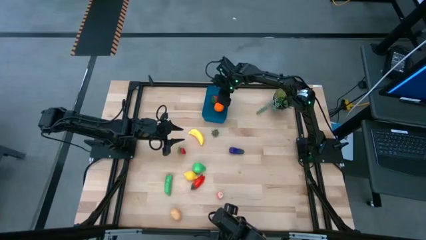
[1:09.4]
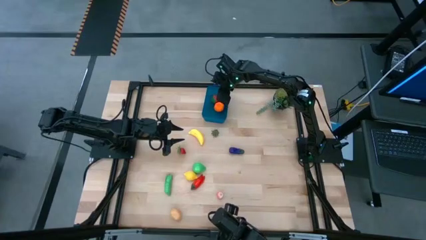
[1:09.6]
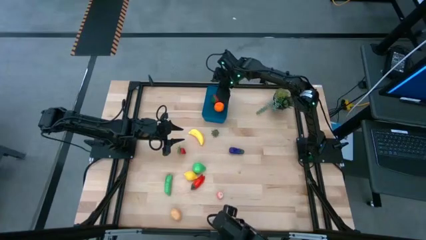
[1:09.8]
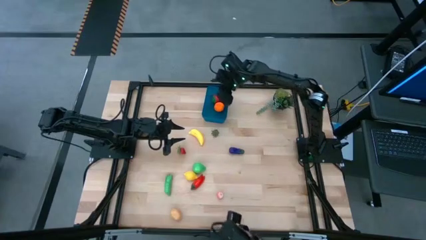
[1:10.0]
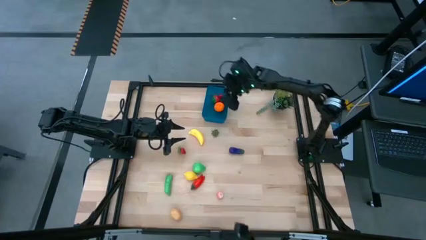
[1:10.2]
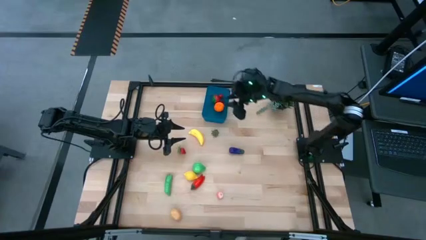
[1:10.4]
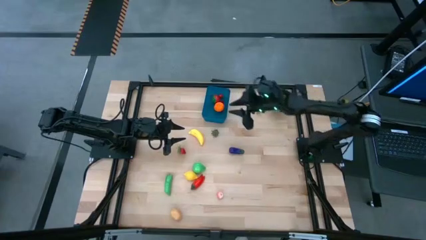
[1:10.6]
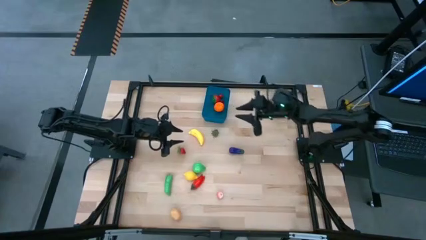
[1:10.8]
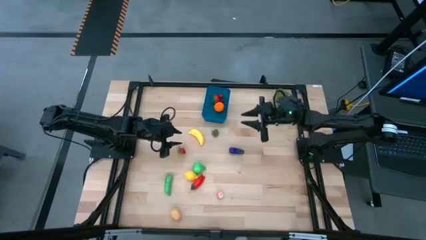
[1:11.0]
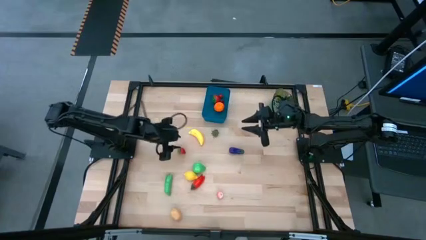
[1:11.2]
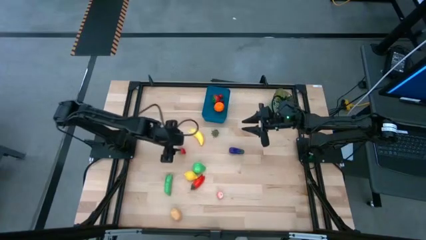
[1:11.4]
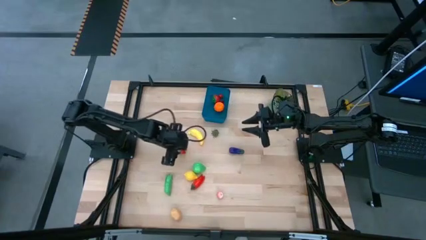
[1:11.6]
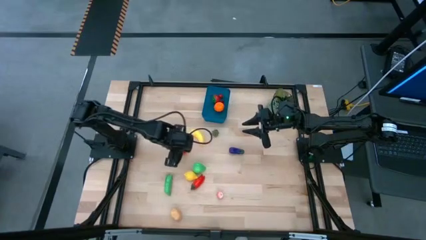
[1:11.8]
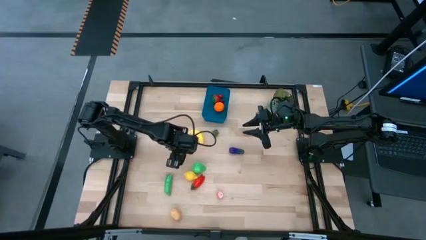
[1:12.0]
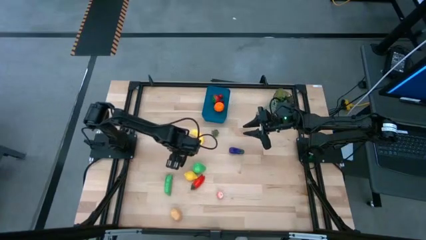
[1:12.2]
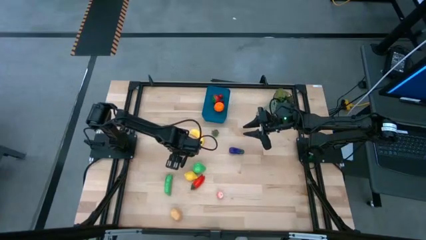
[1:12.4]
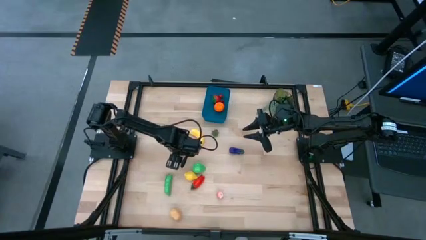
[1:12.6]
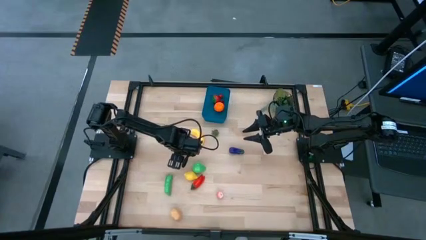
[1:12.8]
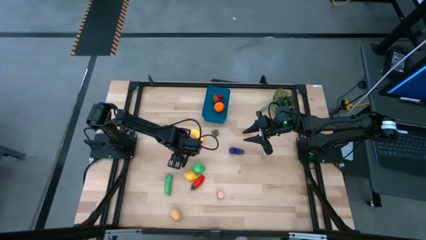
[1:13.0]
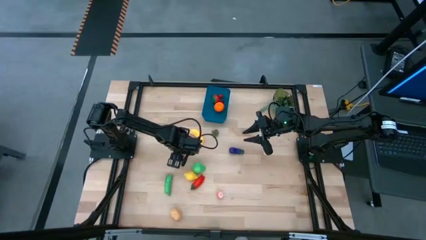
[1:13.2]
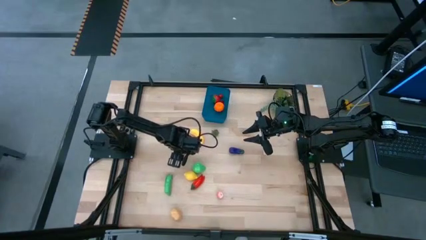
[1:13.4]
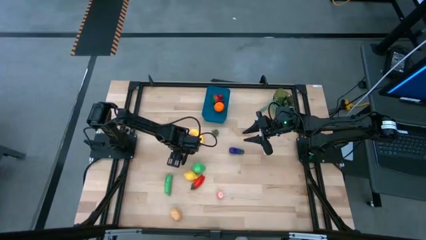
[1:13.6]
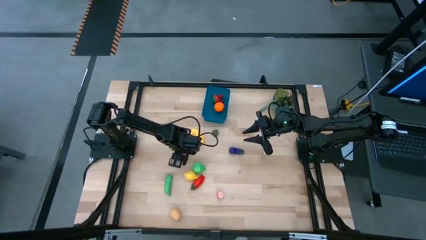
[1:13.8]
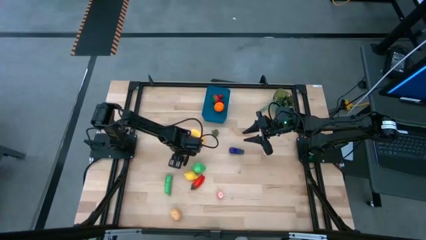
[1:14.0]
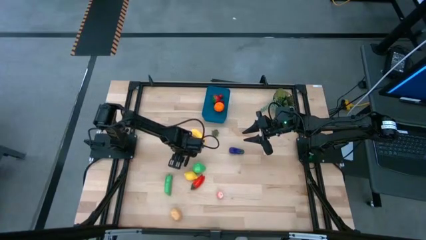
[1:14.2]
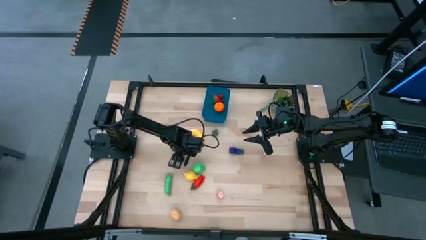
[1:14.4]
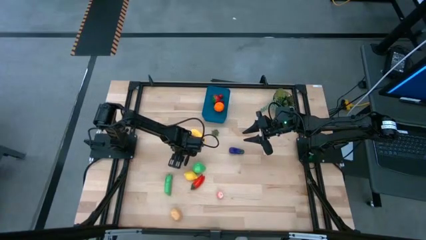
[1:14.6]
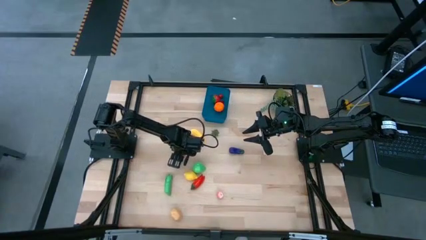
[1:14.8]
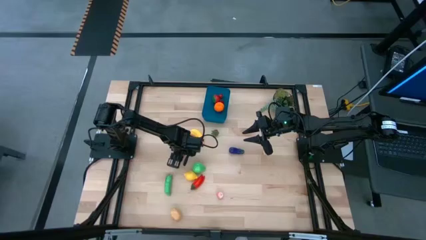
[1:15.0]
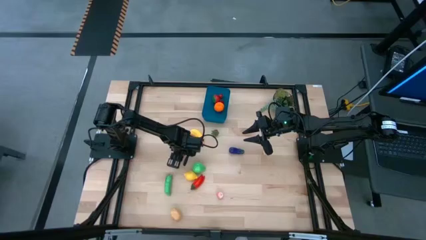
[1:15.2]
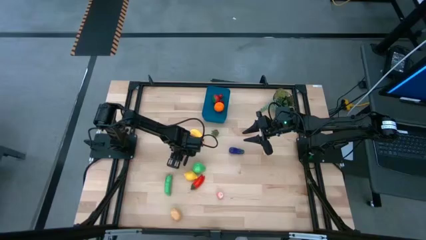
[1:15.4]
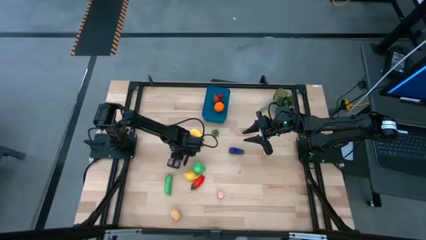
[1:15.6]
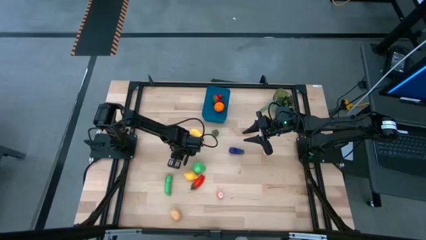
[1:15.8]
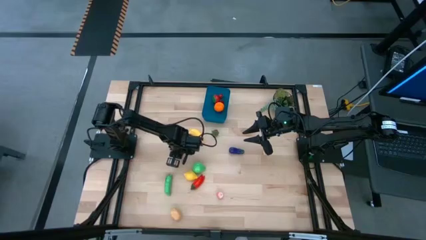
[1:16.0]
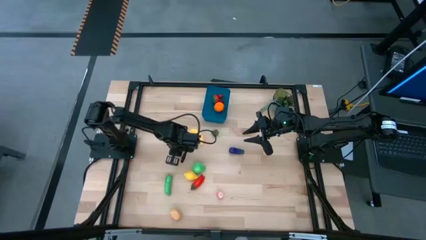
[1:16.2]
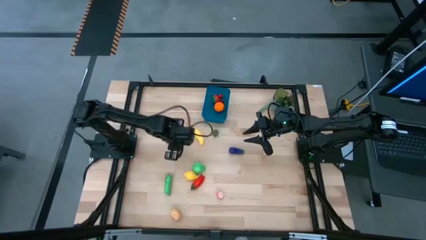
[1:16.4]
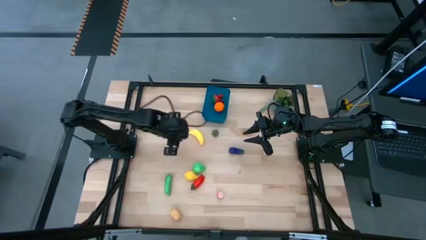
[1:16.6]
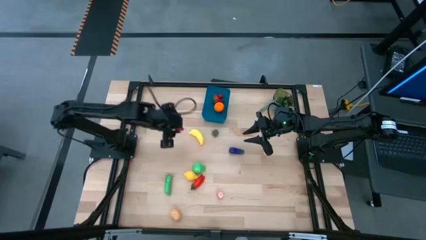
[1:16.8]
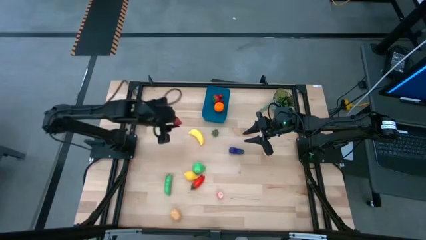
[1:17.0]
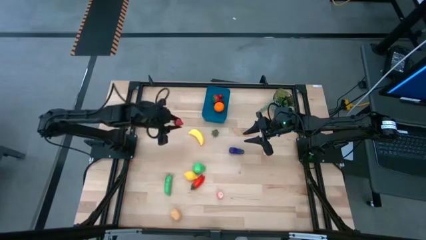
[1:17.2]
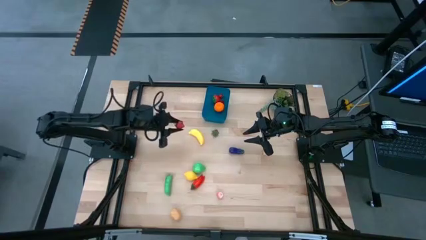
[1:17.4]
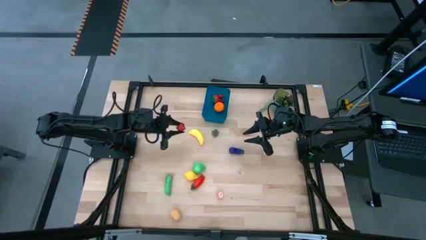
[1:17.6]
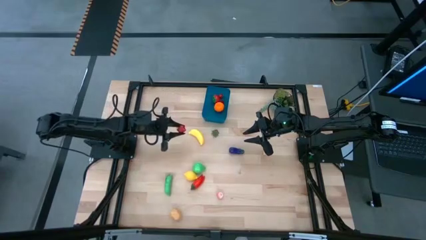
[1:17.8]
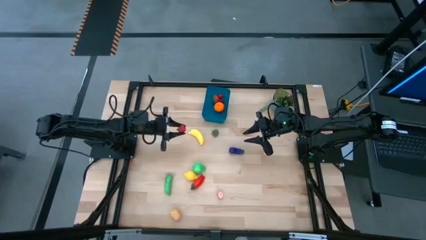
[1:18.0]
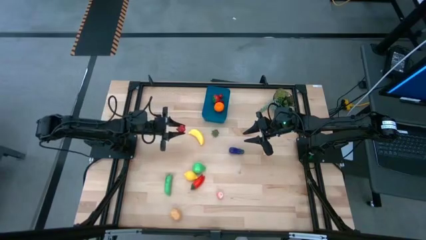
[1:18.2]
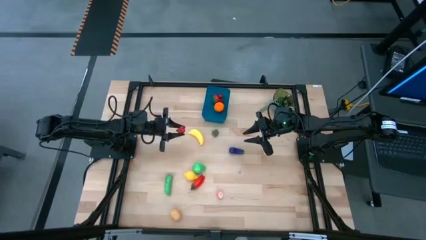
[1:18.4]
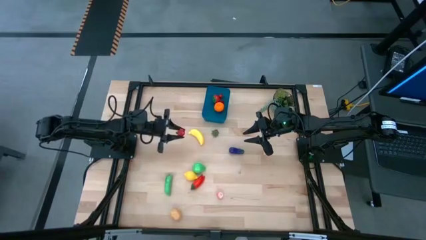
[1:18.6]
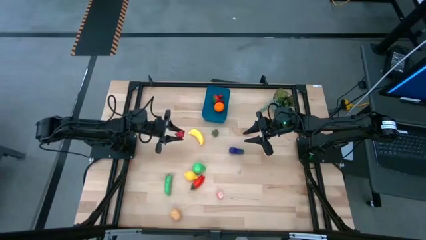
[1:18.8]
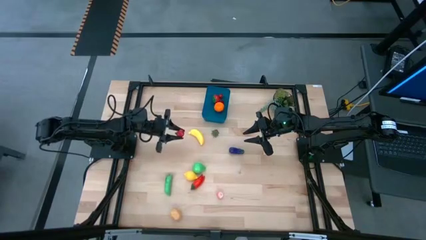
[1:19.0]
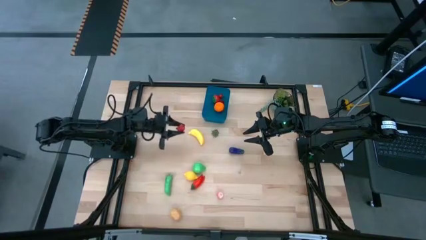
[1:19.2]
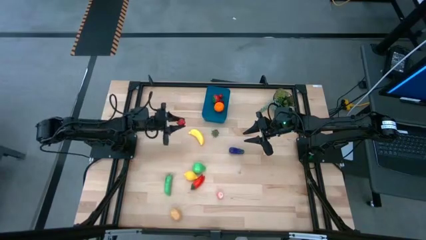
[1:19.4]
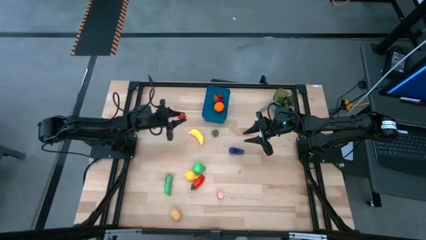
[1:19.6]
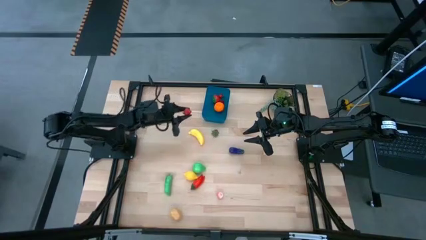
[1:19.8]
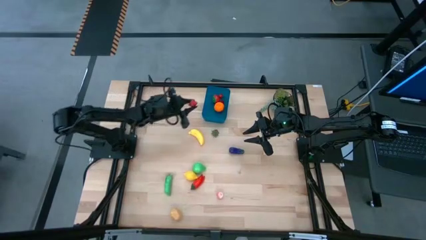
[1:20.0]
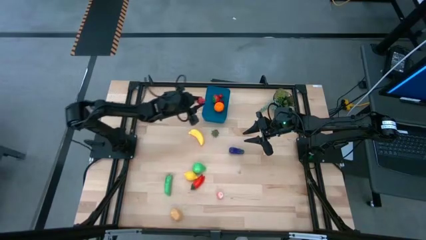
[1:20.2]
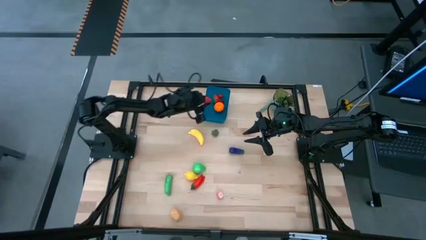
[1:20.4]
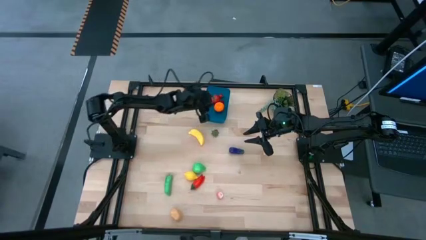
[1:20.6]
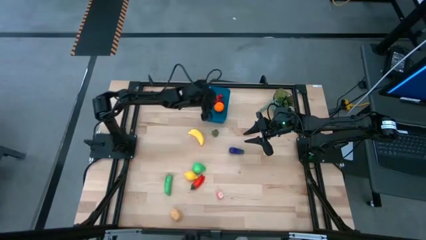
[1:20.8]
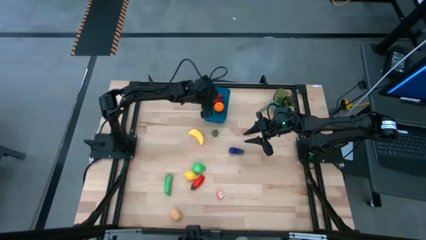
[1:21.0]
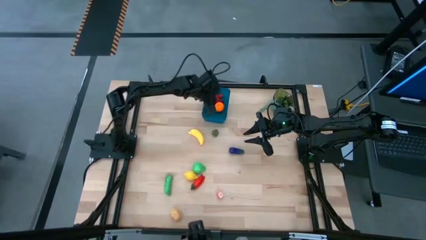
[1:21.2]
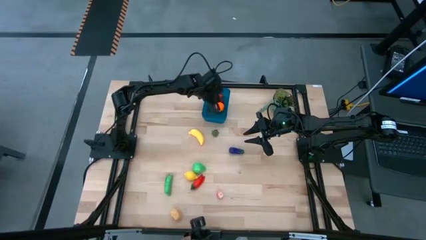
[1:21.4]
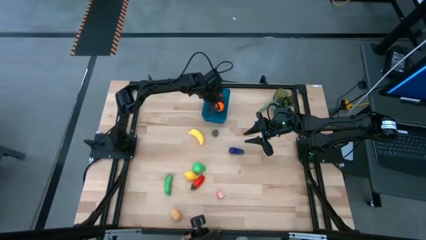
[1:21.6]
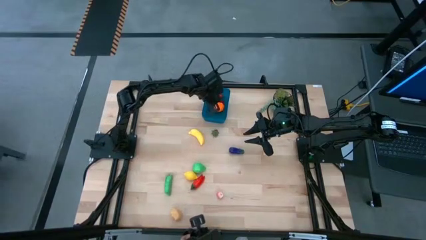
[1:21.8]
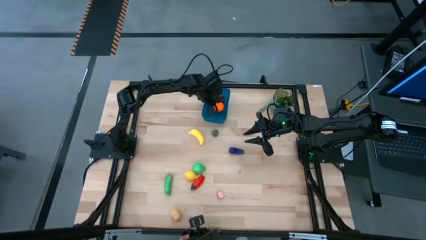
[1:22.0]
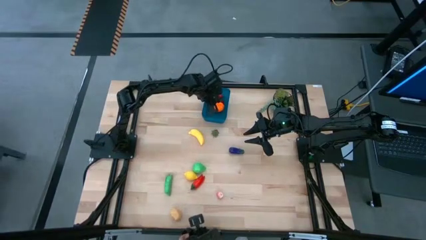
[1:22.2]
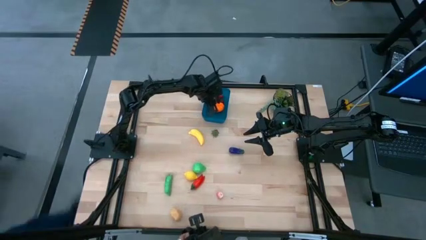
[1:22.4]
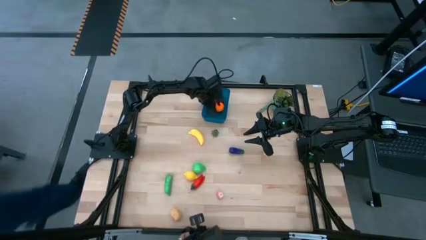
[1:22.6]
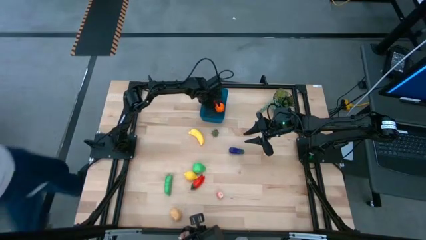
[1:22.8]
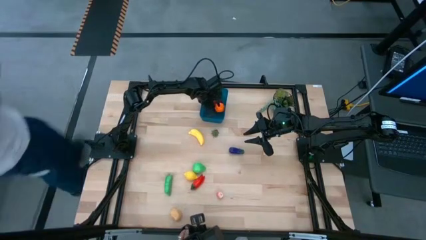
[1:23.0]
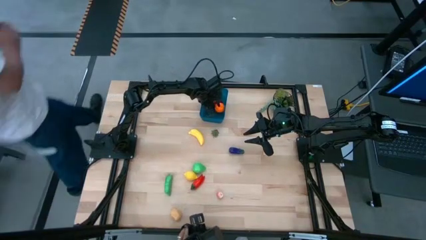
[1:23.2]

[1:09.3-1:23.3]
Task: Pick and placing Produce into tupperware
Put the left strawberry into the blue bin

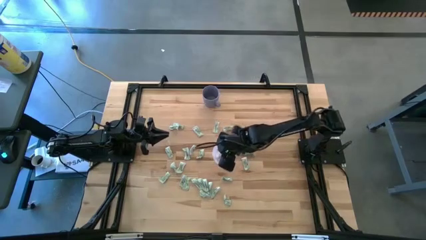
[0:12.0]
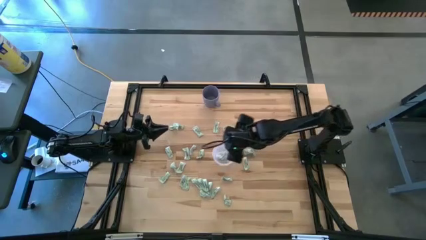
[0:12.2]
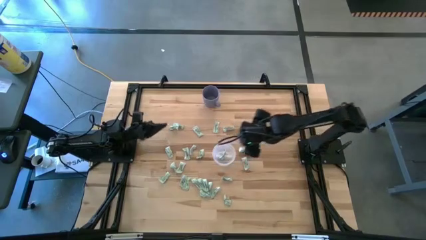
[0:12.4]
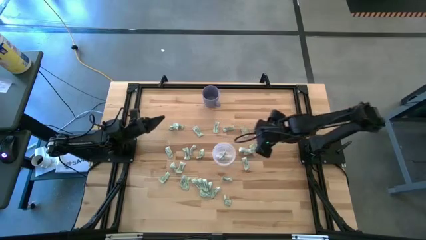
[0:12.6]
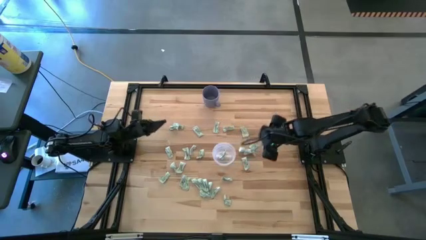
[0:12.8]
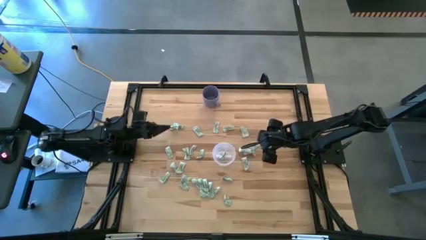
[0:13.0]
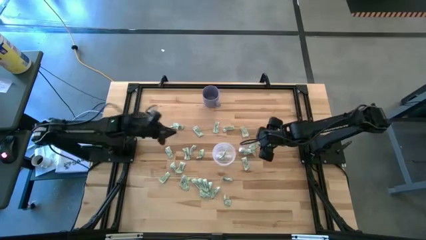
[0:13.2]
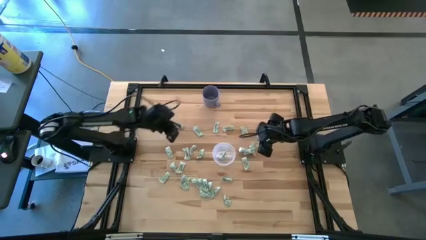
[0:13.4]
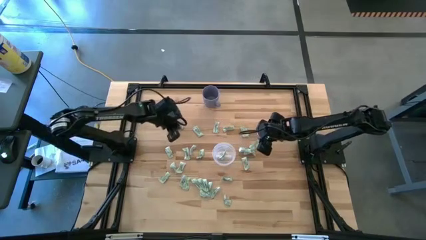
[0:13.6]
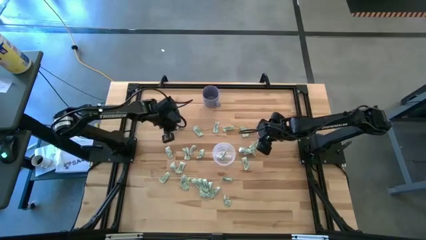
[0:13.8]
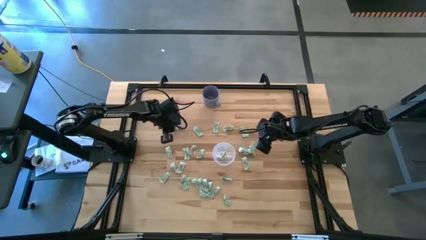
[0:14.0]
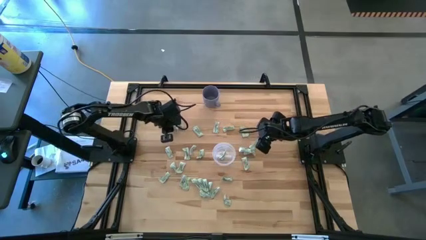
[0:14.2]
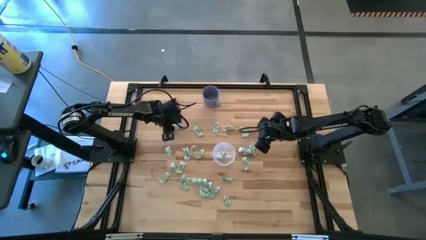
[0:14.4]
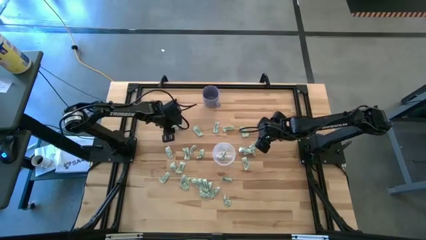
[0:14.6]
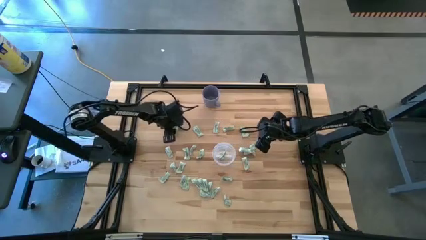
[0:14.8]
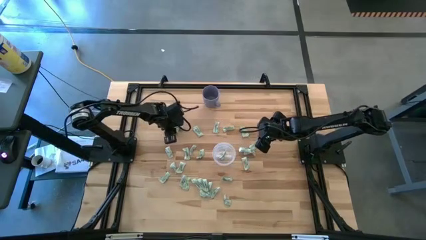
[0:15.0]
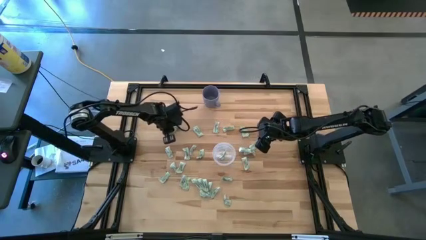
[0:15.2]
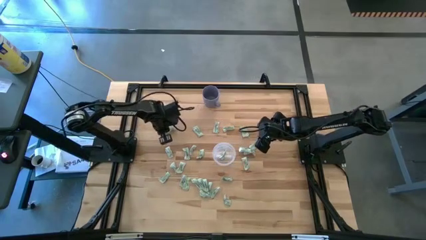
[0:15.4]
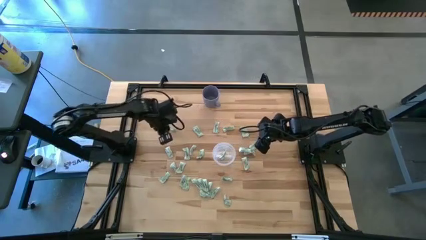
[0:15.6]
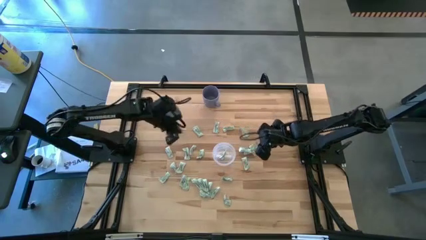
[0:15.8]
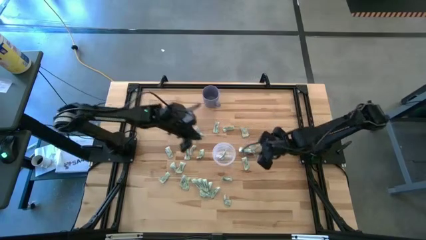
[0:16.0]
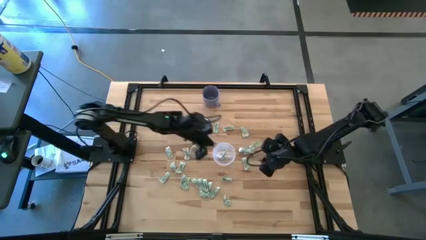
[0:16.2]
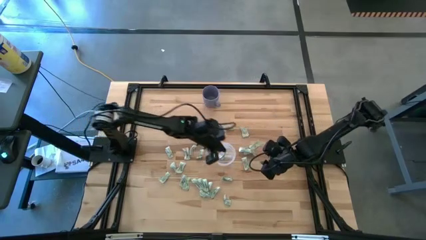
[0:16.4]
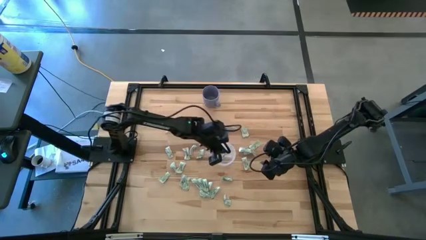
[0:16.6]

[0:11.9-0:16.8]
Task: Pick and place Stevia / Truvia into bins
Put the stevia packet into the transparent container
